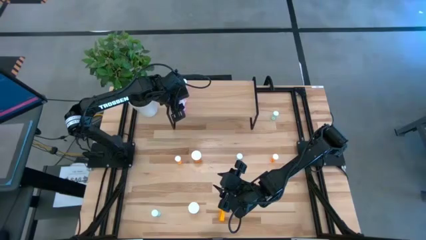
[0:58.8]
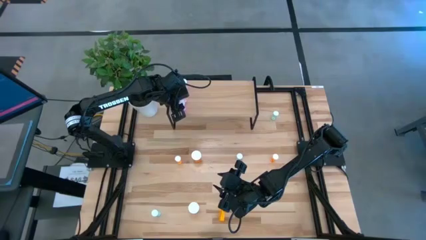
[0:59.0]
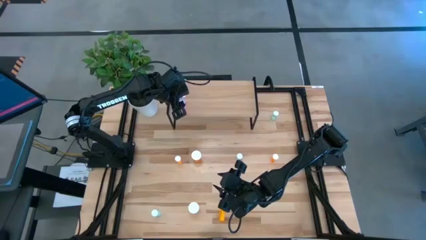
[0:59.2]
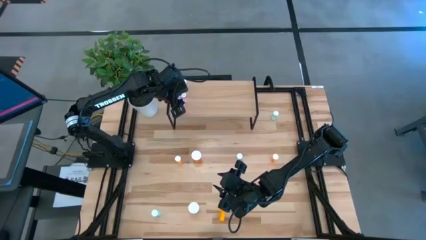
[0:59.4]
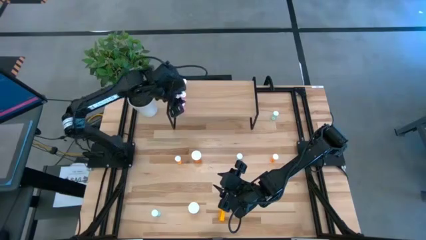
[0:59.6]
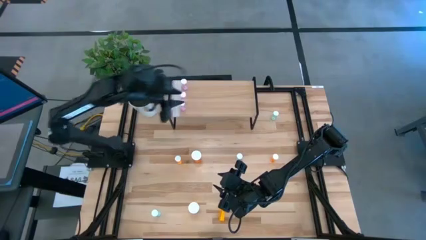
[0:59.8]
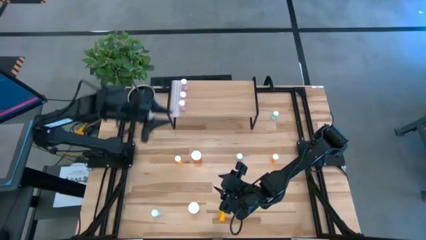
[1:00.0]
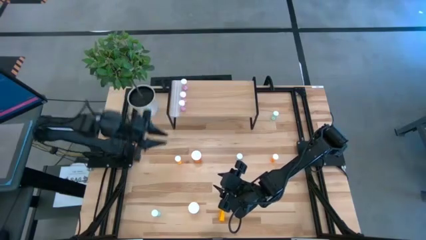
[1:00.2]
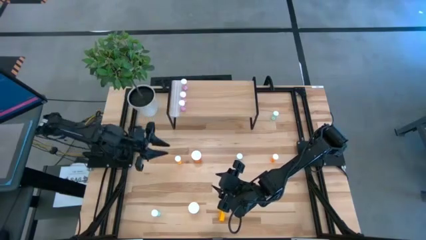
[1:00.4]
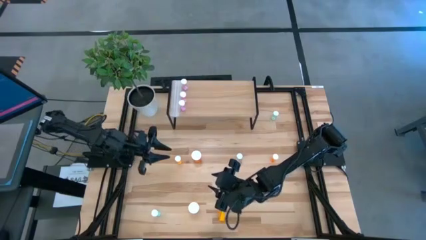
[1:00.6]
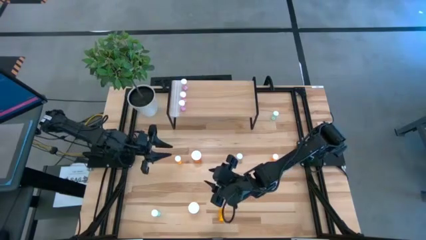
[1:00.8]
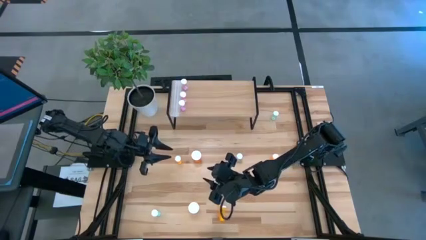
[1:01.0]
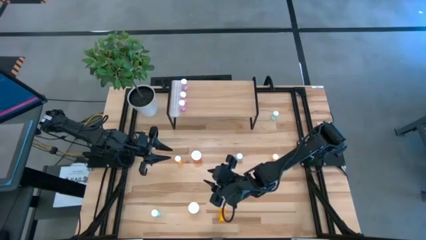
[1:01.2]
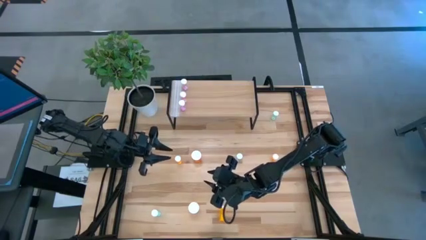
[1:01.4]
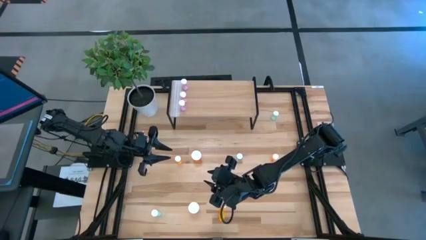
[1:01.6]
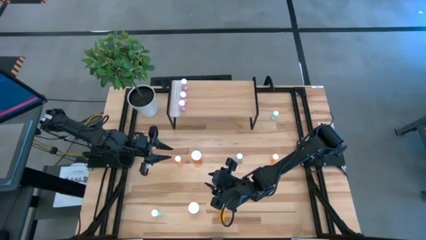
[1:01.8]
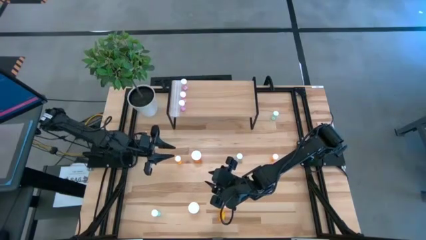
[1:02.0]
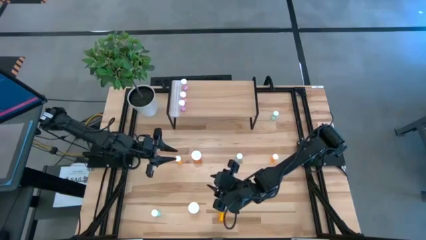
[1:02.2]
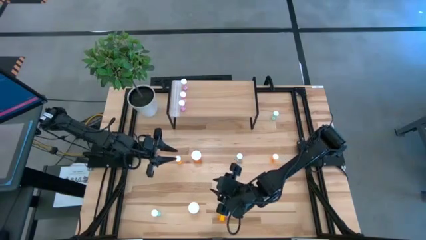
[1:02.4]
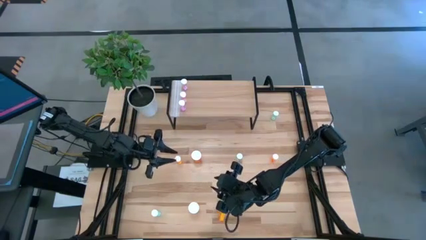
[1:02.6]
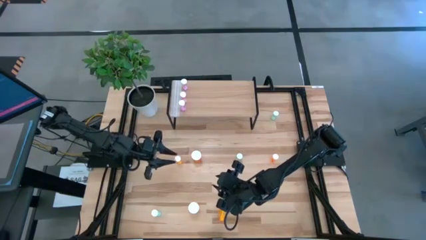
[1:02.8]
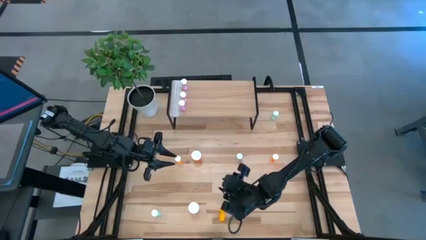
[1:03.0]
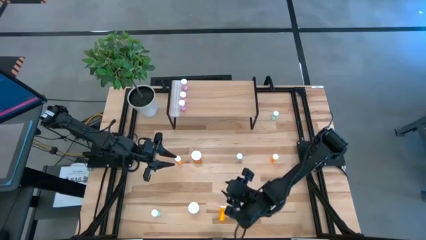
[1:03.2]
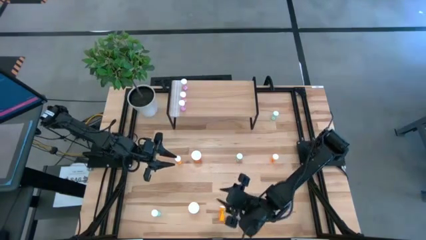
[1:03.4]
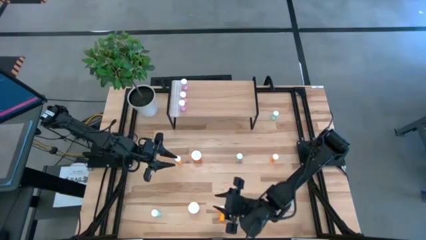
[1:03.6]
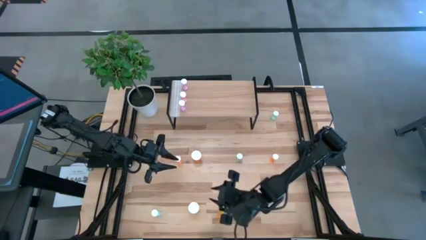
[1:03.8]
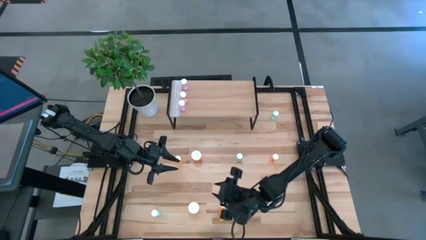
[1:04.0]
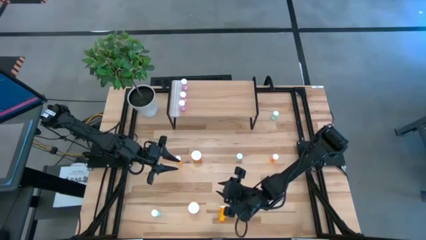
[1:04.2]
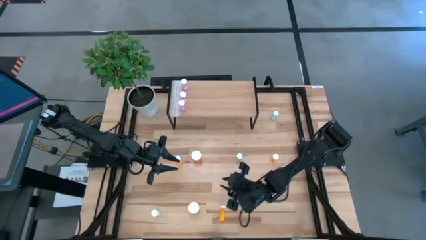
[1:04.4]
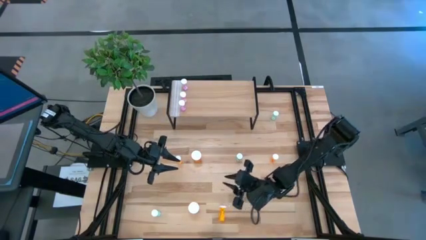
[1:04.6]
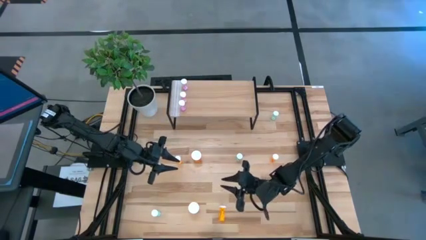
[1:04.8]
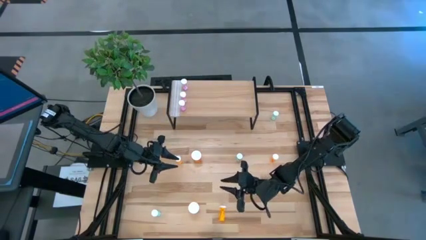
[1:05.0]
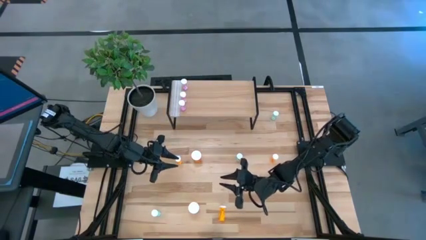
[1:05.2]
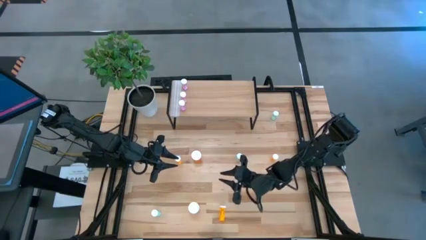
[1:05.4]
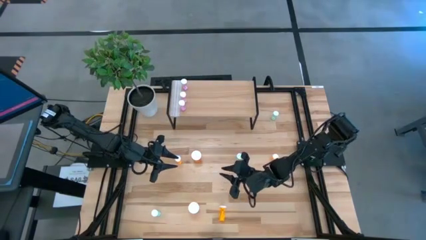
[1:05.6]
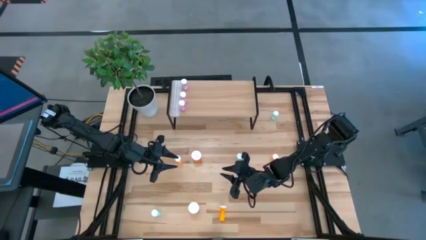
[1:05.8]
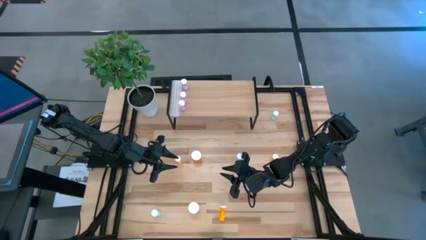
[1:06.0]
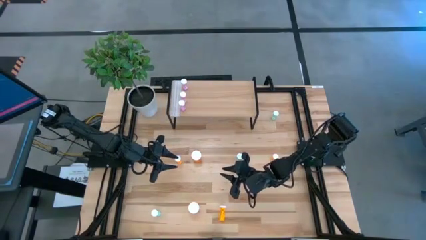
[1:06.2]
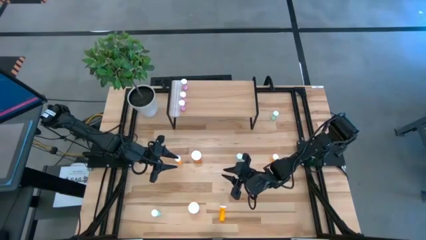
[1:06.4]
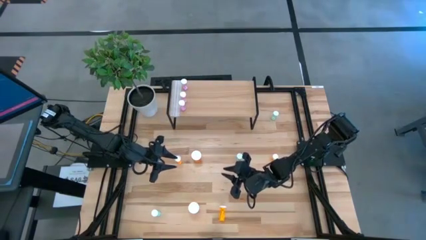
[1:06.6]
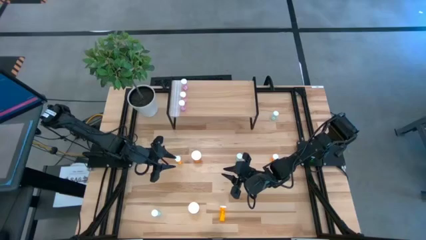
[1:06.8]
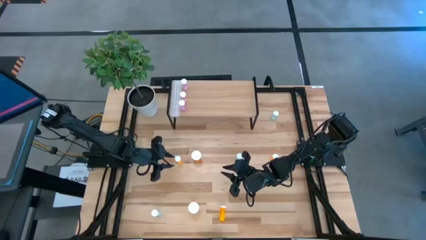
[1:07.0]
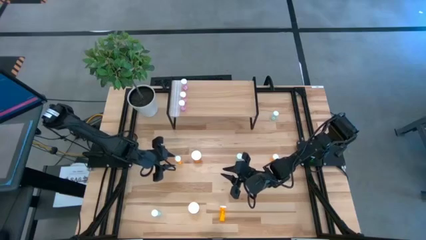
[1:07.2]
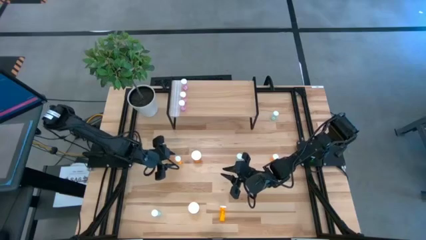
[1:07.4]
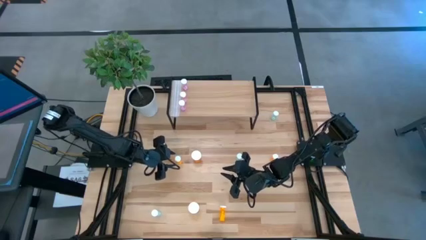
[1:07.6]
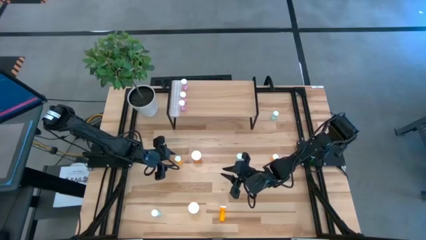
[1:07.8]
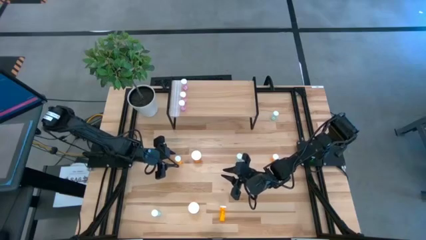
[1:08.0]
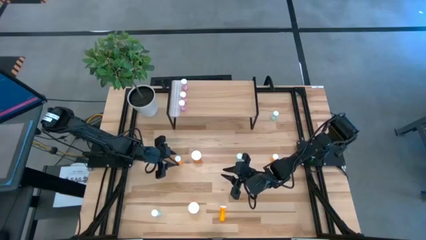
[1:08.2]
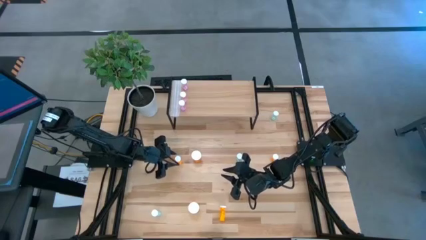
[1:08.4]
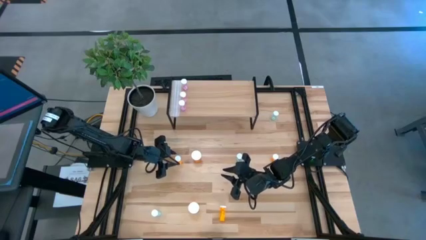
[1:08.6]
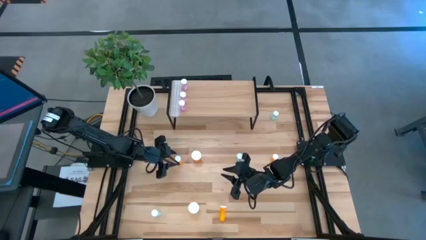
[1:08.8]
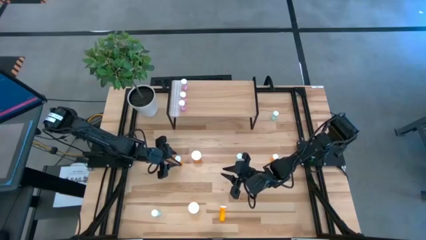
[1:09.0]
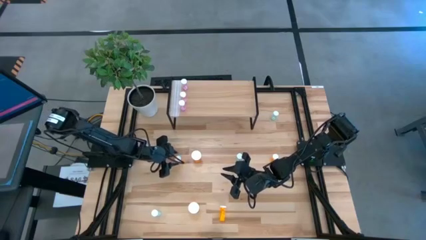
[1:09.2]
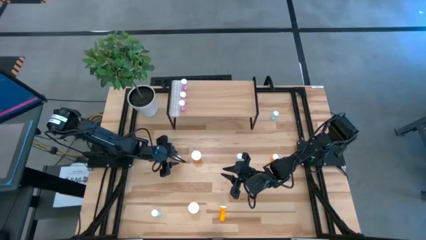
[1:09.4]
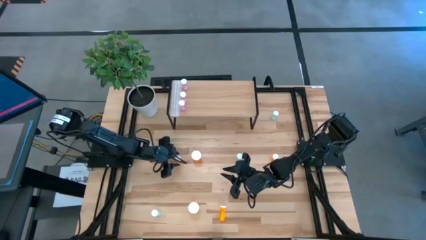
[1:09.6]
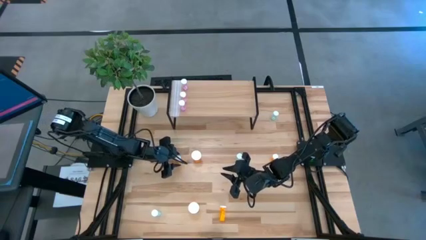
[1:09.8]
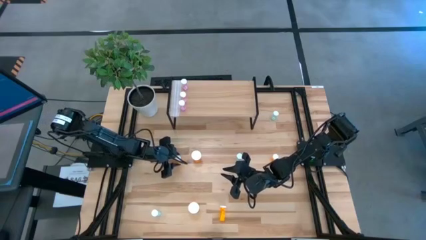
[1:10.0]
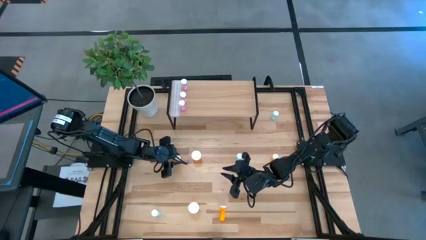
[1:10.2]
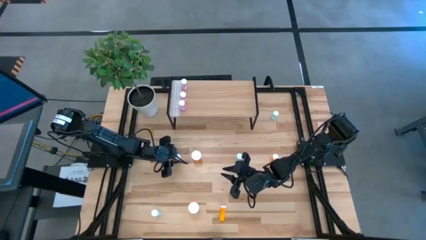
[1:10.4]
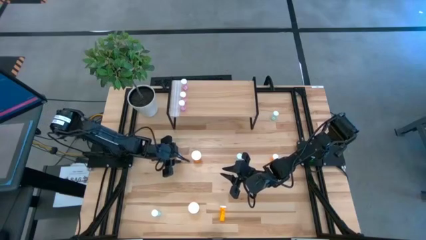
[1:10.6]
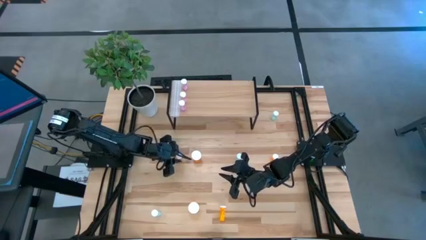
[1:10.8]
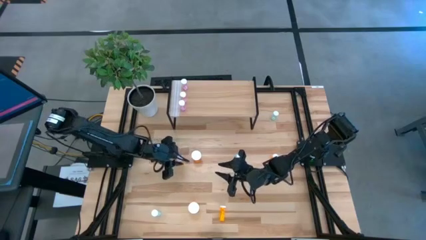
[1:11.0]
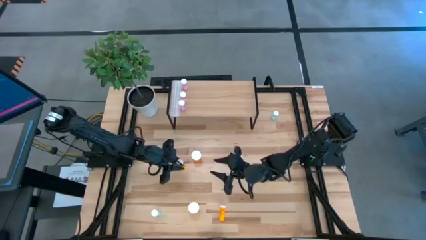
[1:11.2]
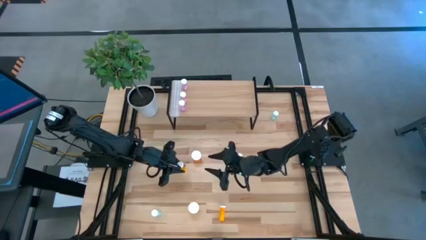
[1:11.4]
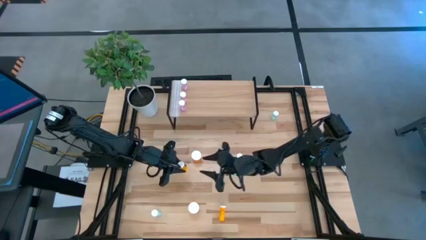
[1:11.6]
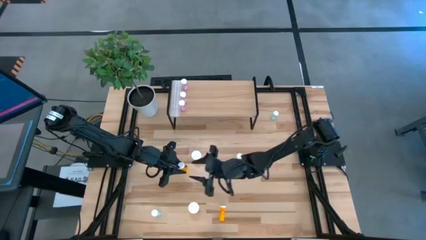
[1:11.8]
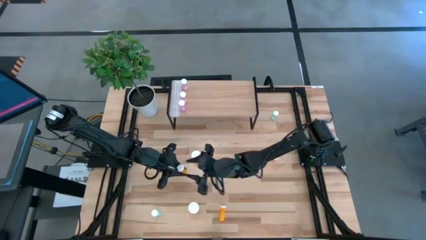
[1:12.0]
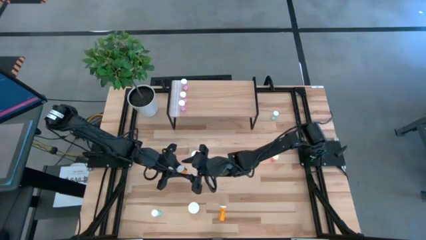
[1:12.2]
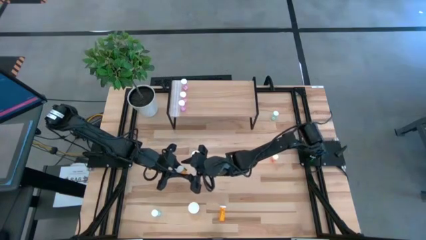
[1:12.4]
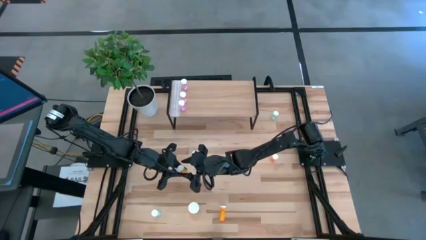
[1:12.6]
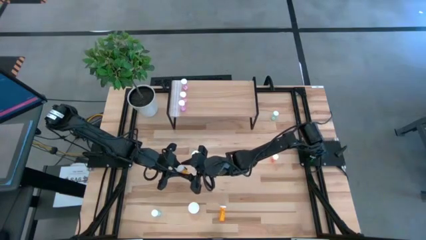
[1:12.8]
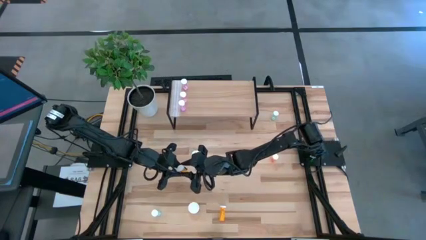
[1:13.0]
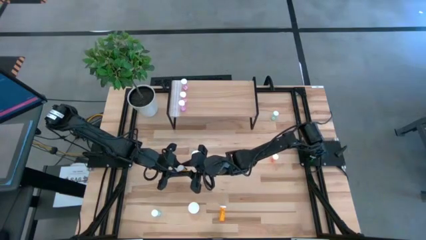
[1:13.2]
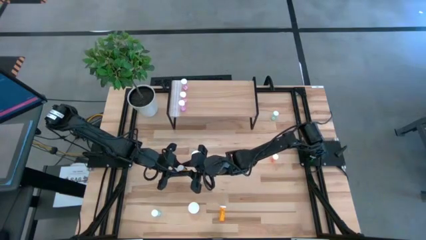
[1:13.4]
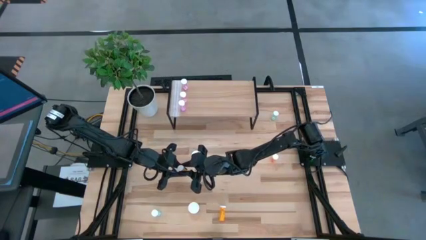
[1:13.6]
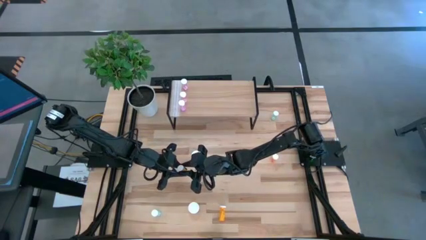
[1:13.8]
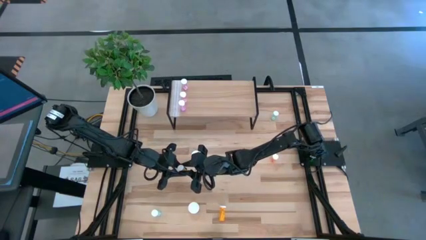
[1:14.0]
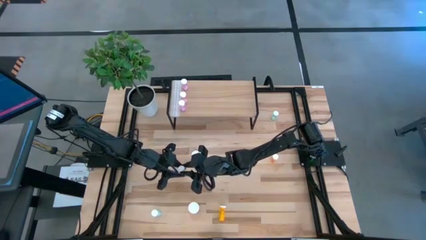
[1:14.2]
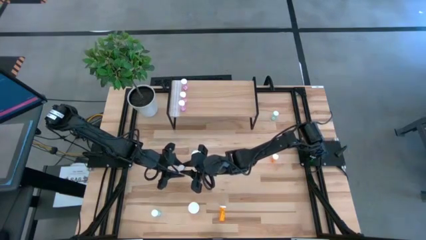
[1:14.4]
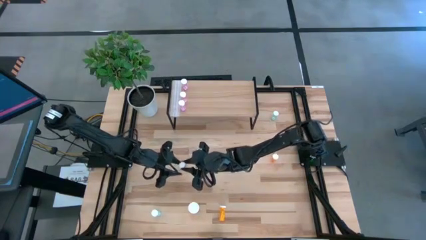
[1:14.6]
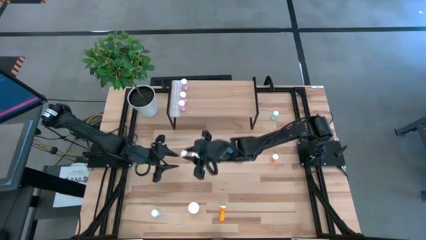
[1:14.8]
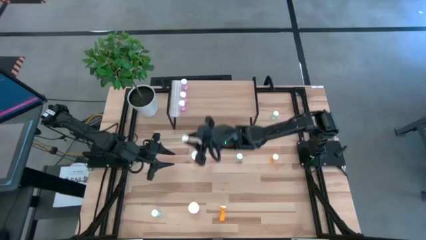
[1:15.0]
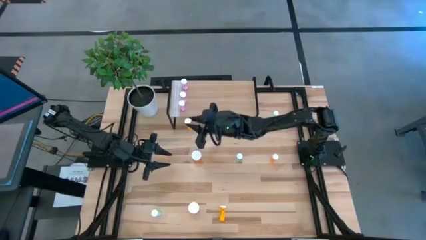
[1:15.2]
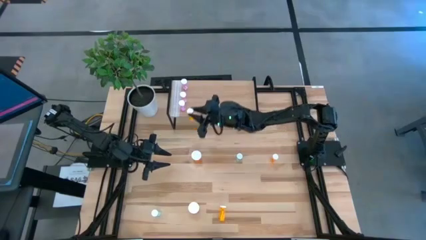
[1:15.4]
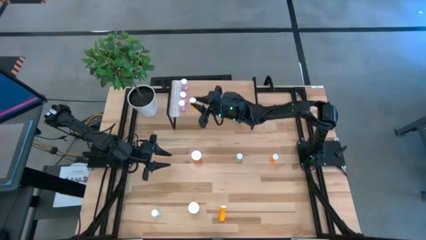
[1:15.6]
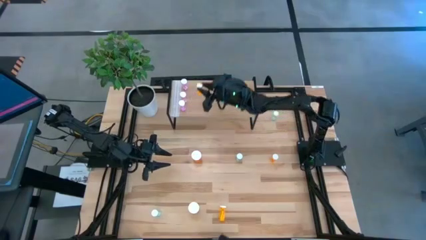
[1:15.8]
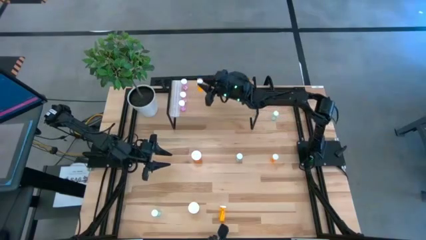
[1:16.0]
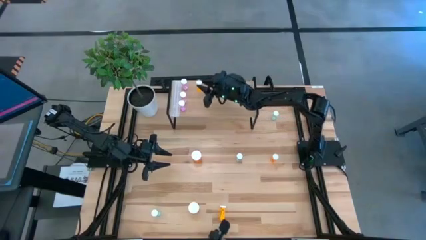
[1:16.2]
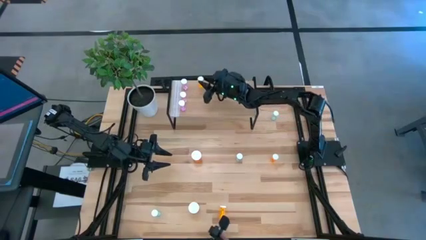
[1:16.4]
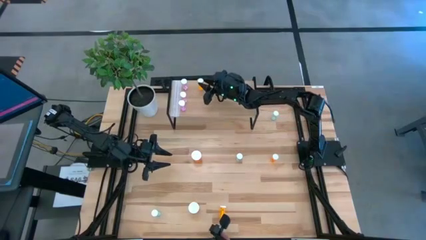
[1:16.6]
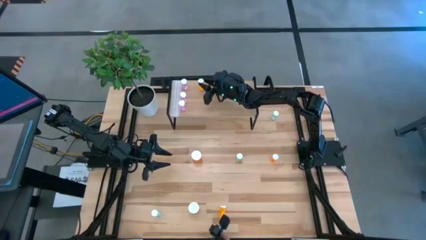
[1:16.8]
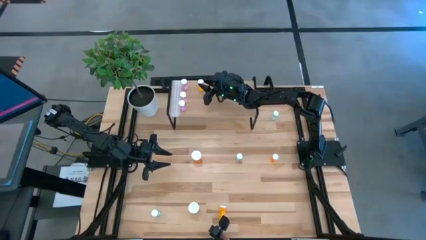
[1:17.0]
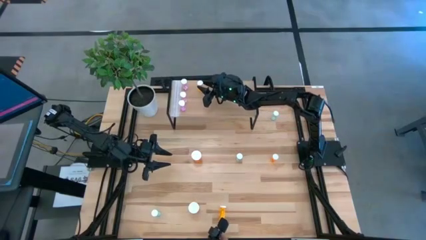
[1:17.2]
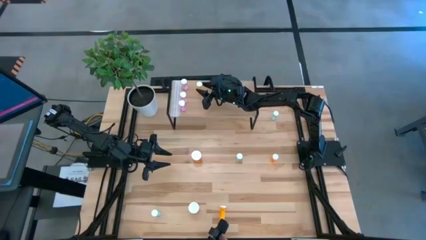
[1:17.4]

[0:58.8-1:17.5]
Task: Pick and place medicine bottles onto shelf by color
Put the top left small orange pill bottle on the shelf
